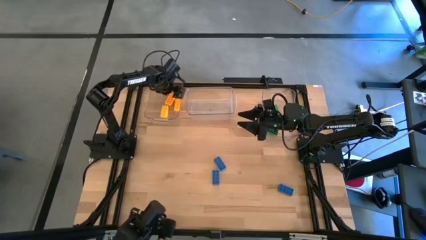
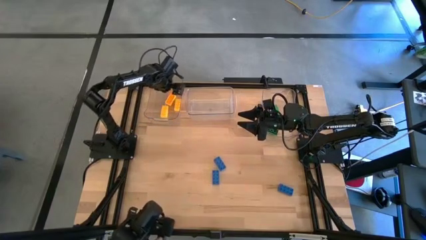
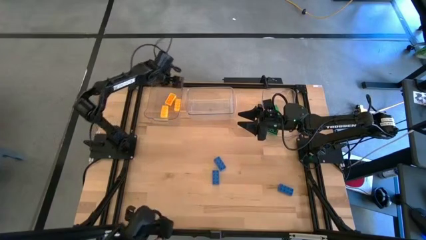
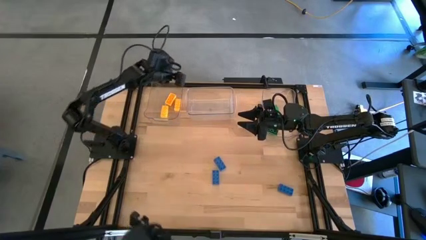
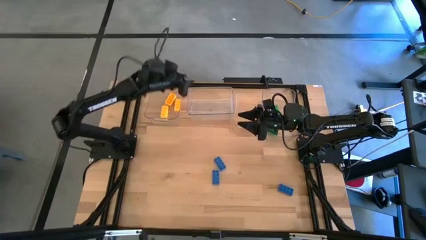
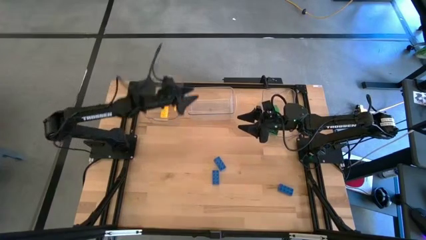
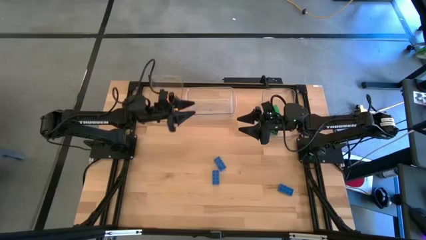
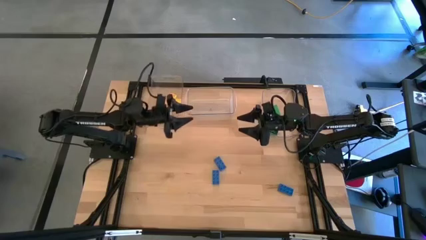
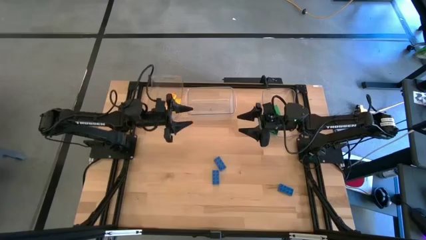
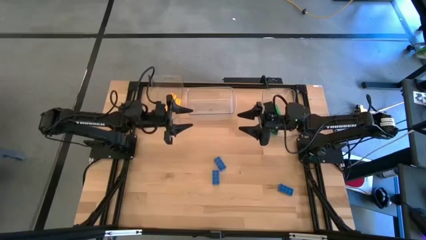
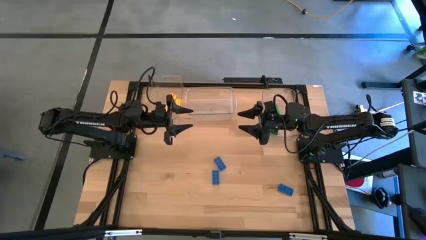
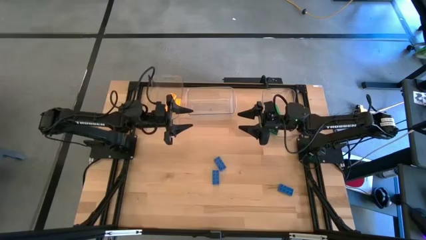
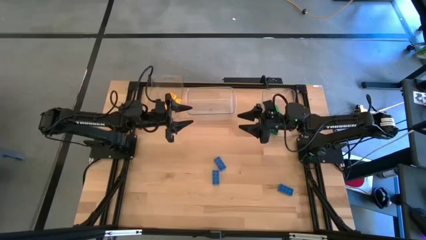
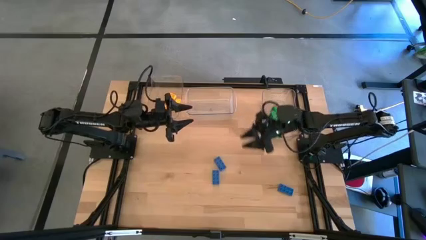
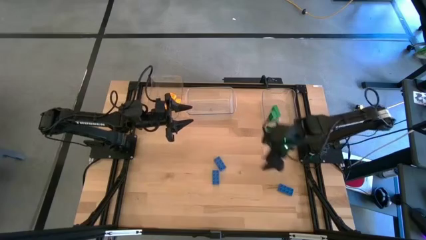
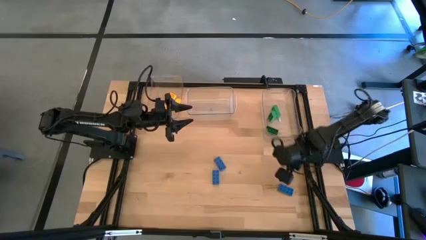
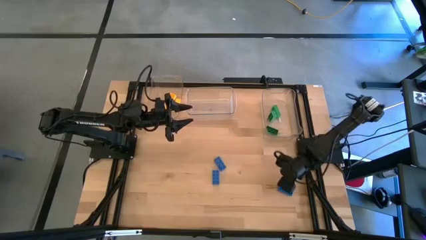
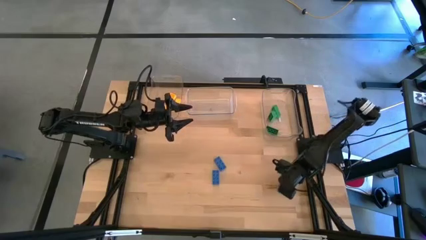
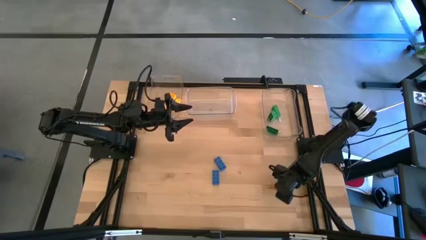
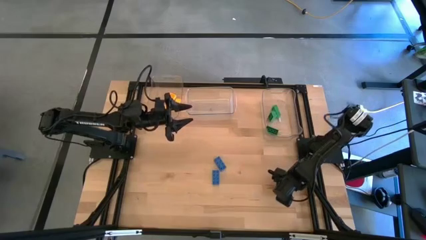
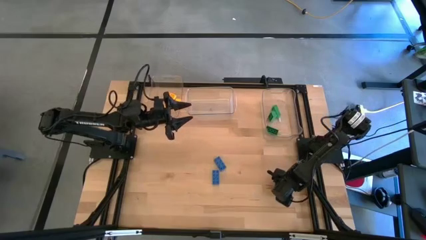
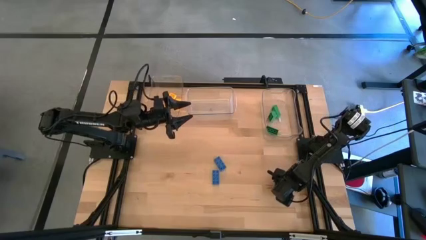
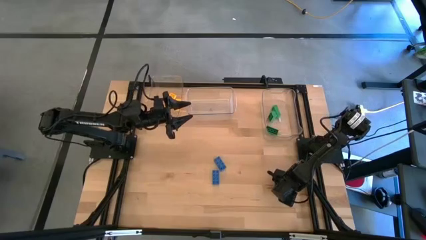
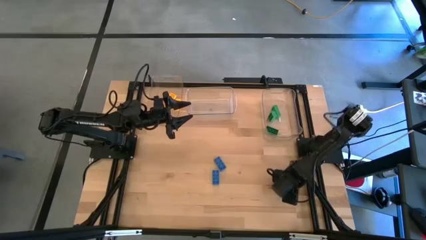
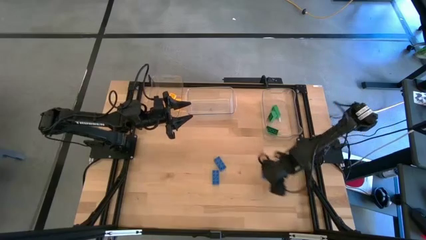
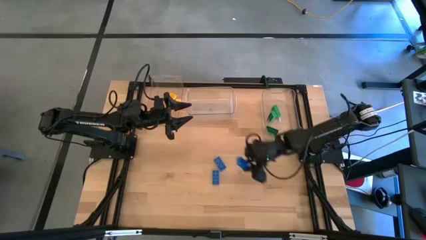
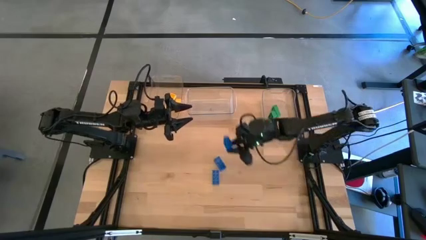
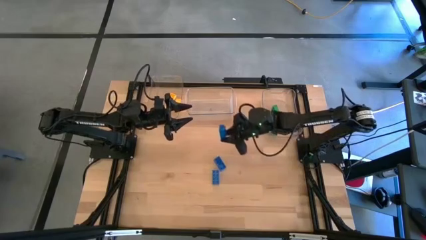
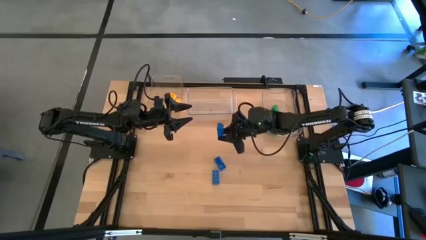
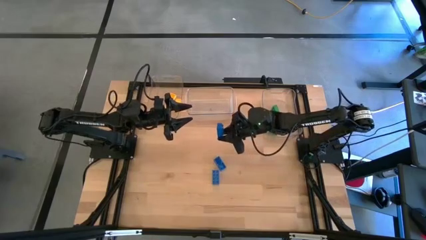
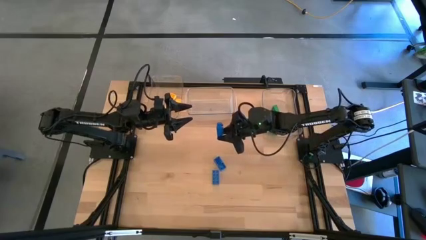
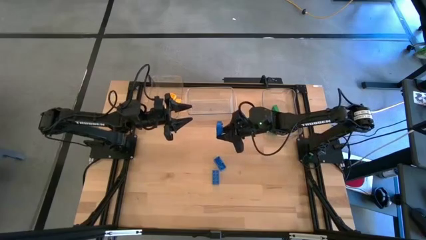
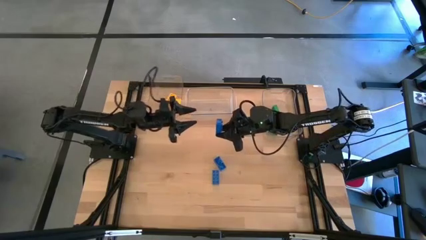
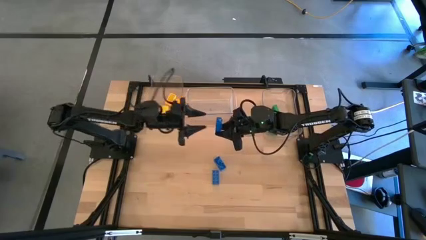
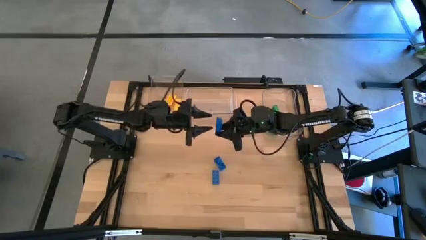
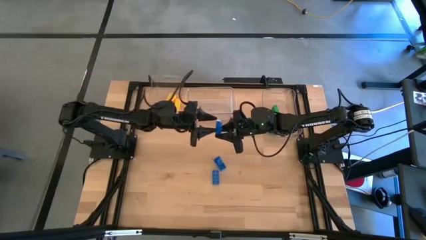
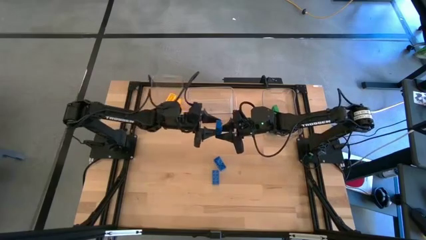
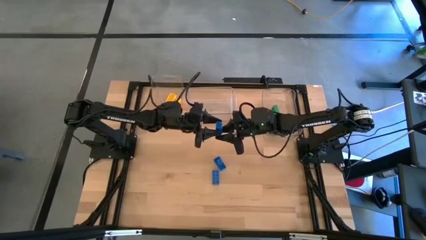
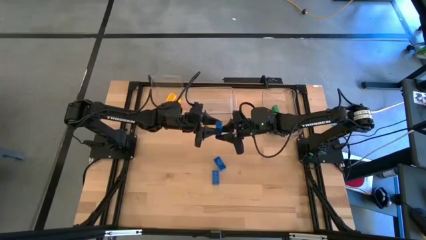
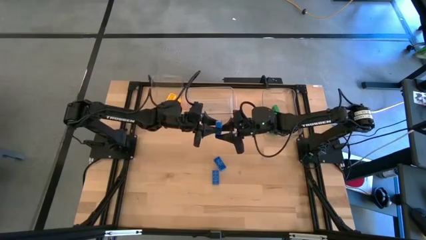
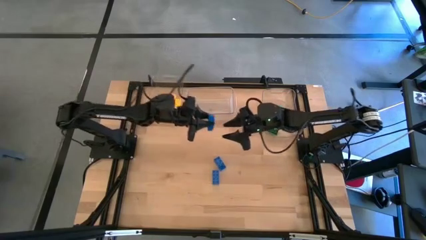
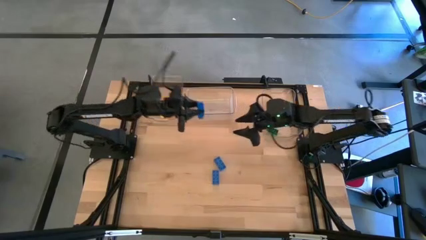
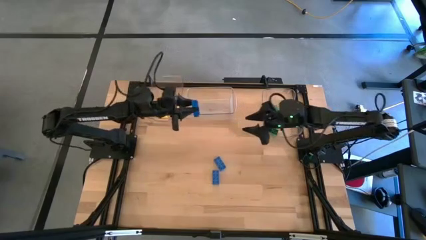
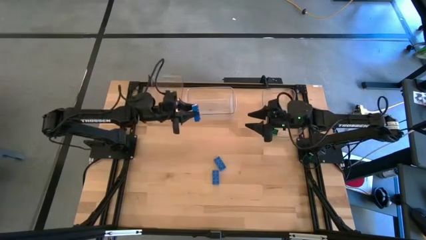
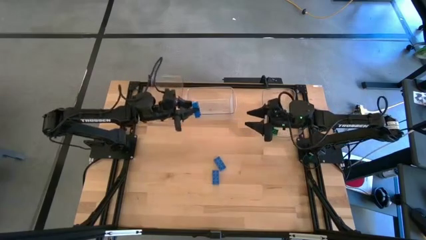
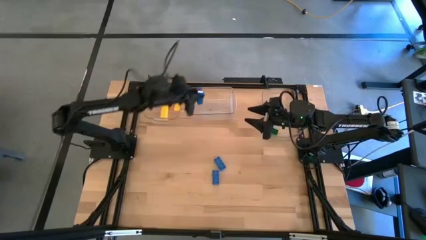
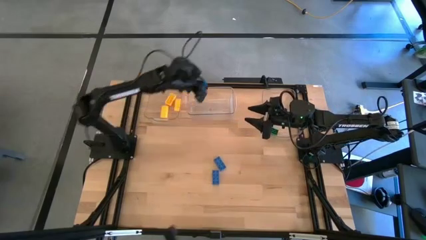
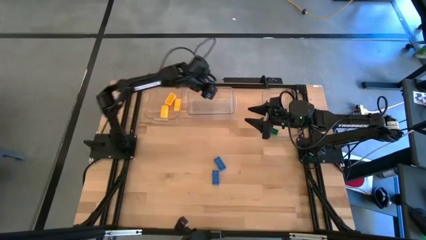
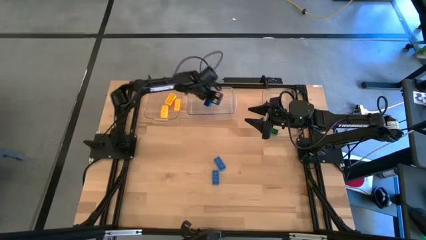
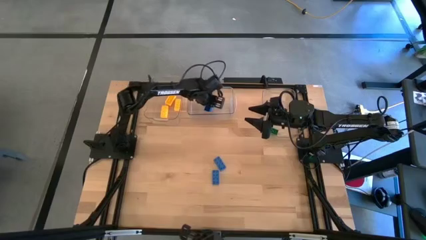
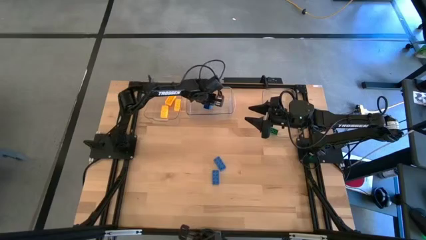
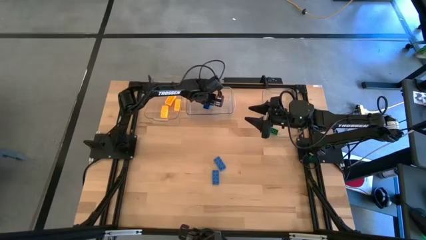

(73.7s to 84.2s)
Task: Sort & place blocks by color
Put the bottom right blue game piece into the center transparent bin

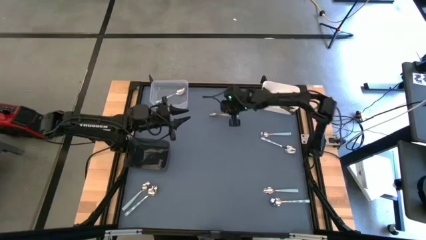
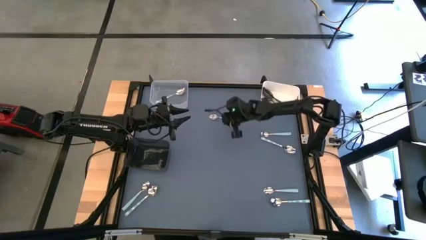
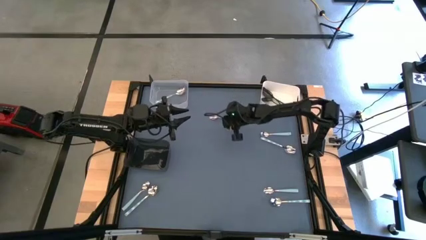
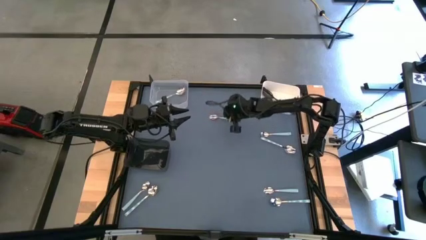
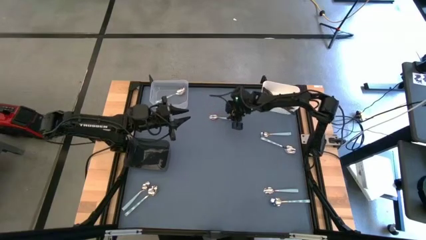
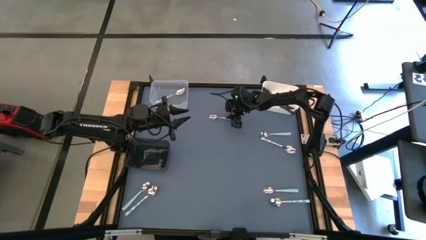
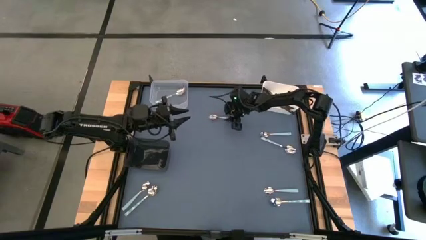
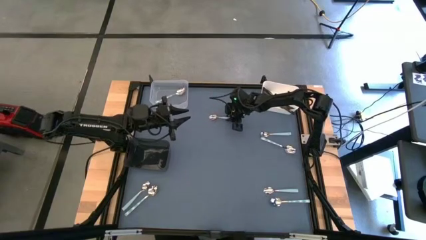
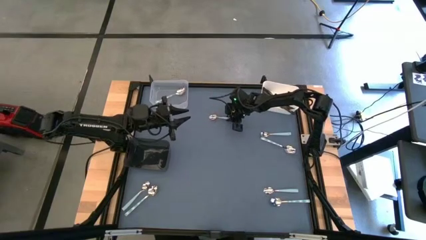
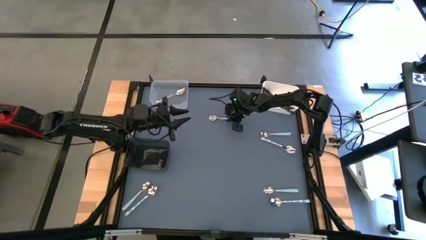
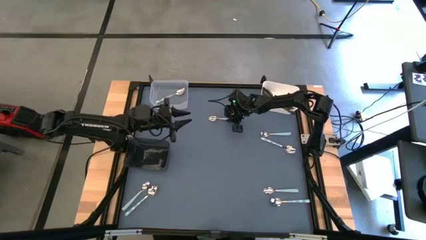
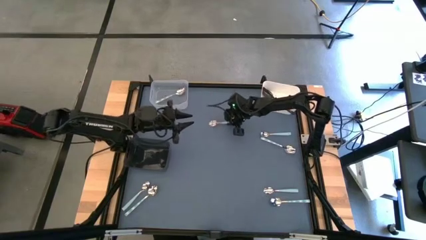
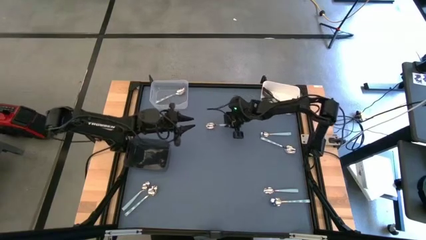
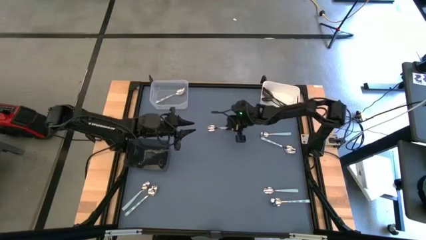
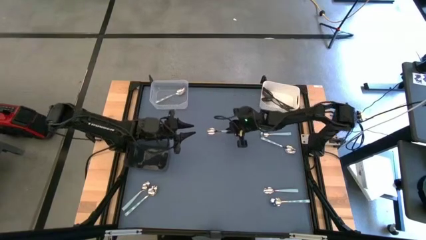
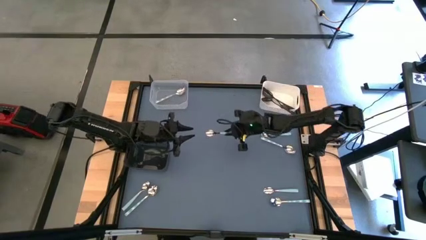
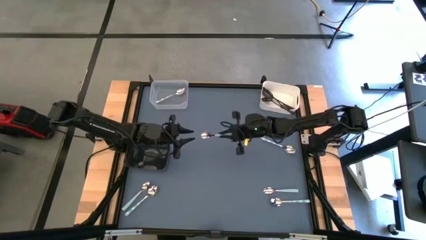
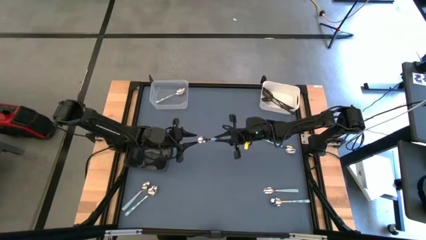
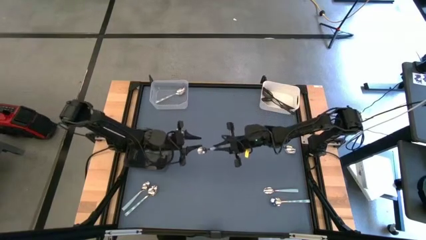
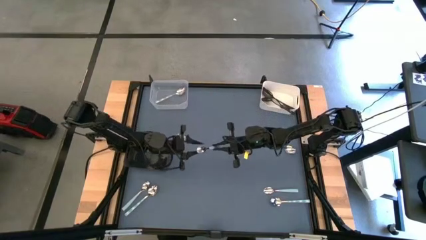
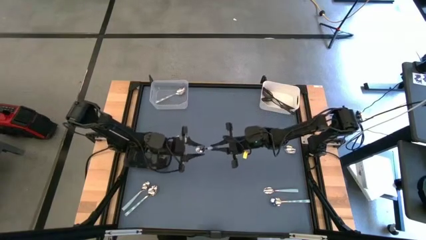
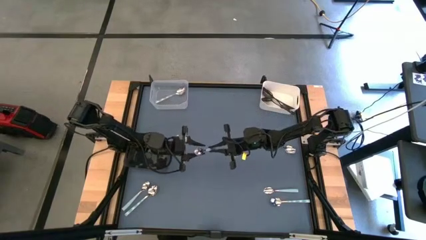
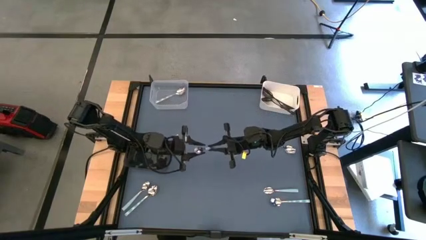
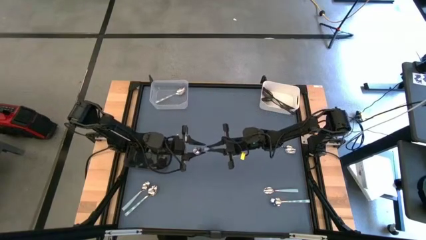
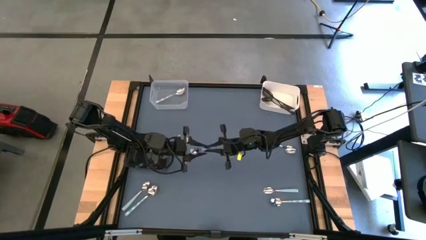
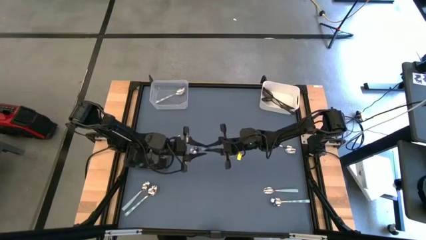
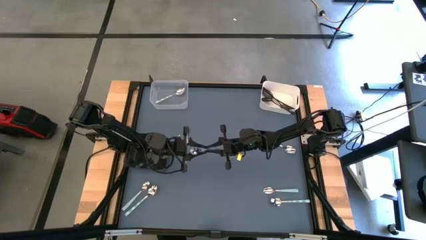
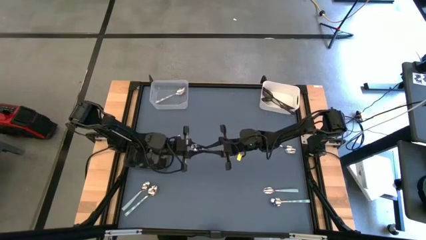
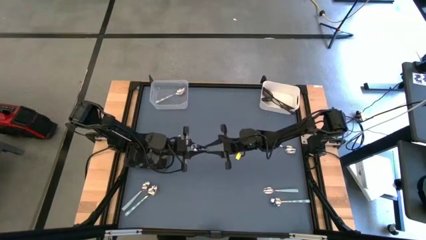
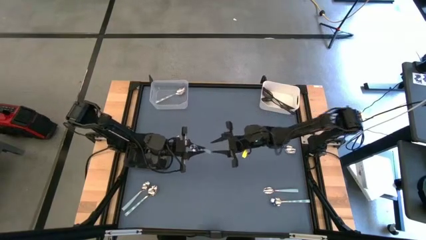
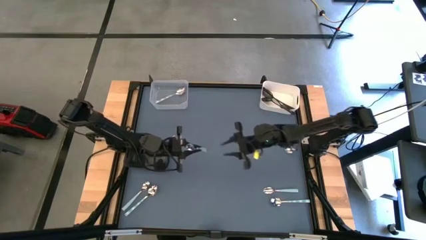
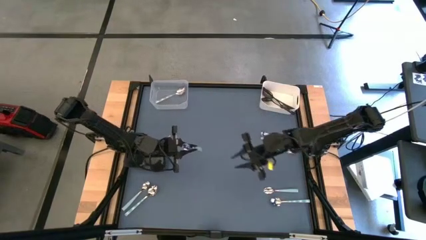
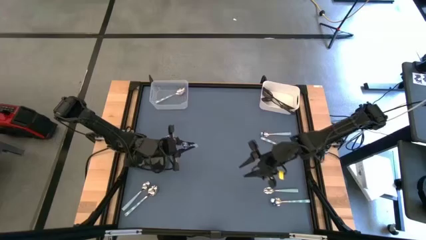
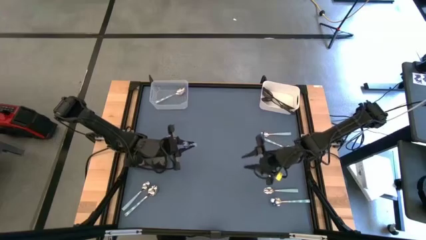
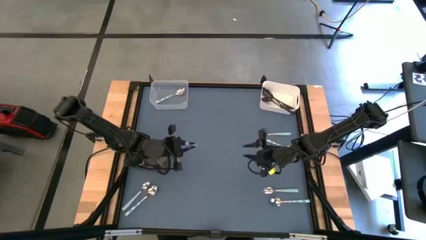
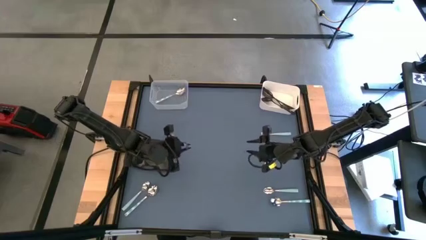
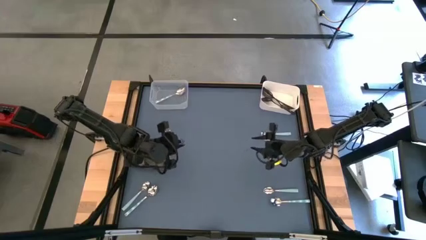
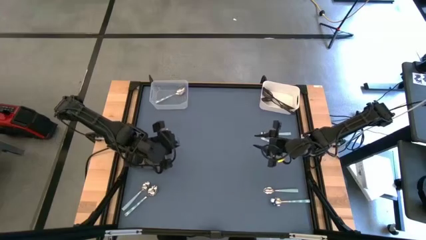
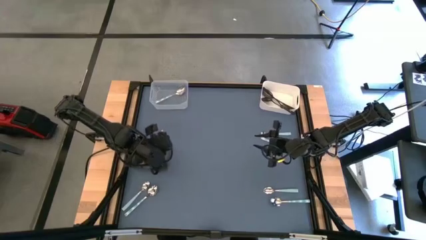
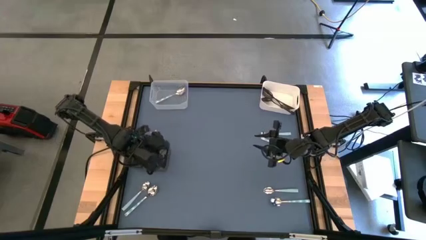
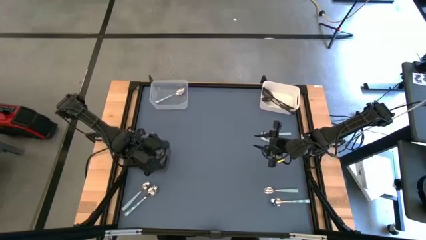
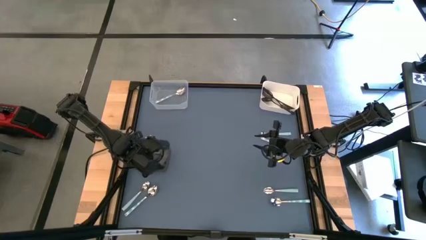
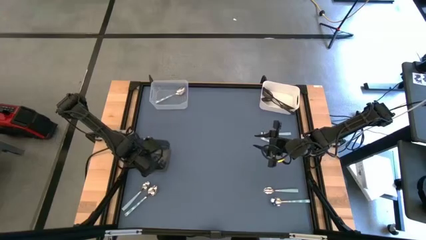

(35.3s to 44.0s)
Task: Sort silverware by color (type)
Put the blue spoon into the black bin
